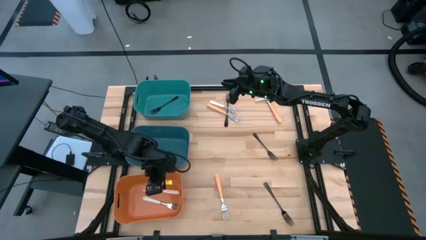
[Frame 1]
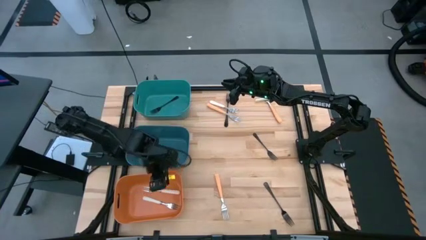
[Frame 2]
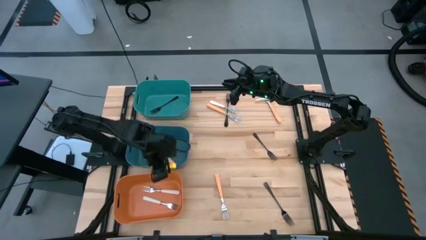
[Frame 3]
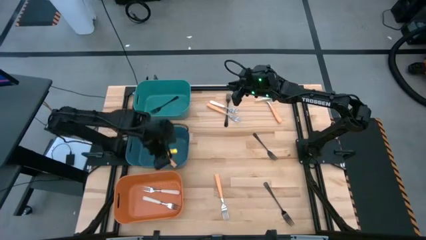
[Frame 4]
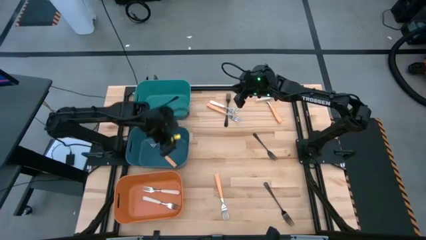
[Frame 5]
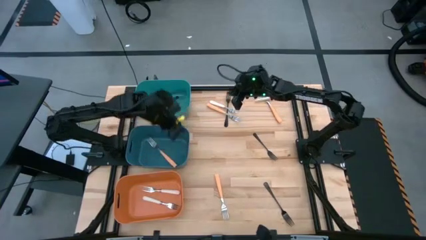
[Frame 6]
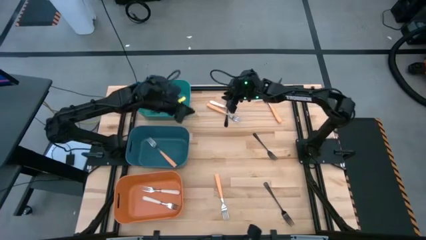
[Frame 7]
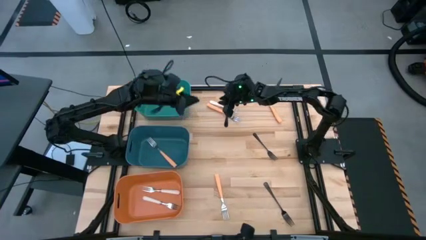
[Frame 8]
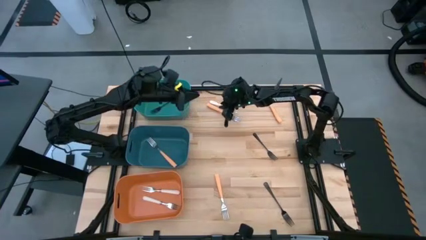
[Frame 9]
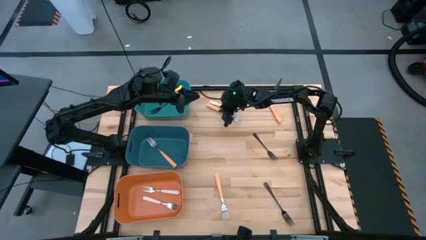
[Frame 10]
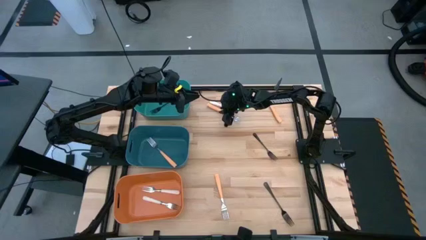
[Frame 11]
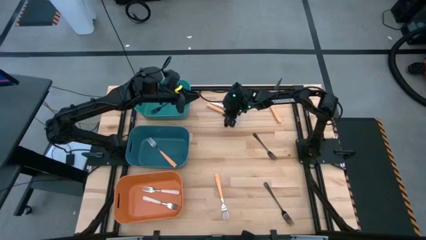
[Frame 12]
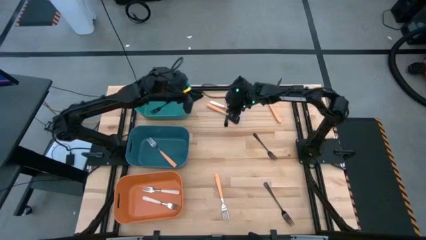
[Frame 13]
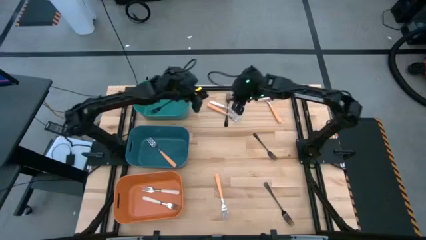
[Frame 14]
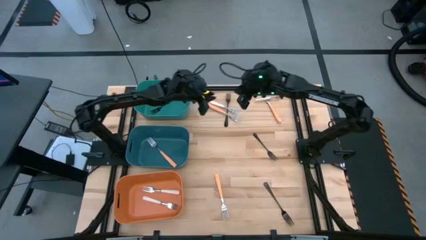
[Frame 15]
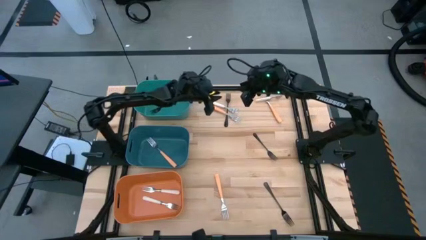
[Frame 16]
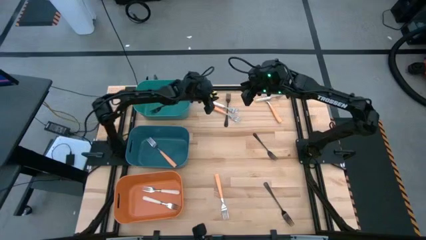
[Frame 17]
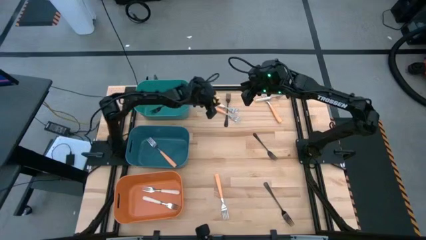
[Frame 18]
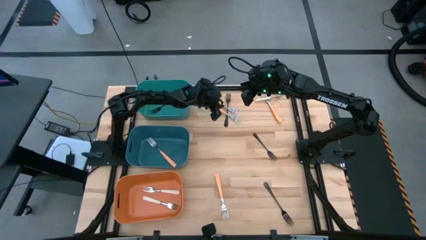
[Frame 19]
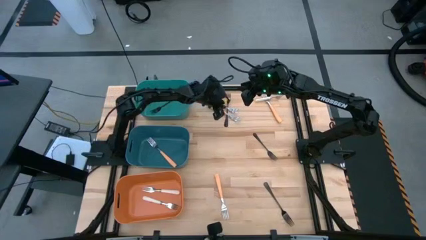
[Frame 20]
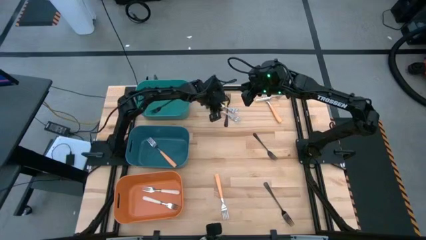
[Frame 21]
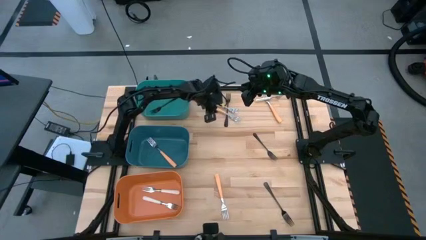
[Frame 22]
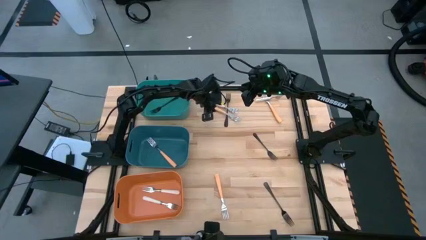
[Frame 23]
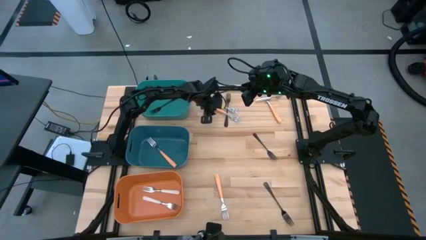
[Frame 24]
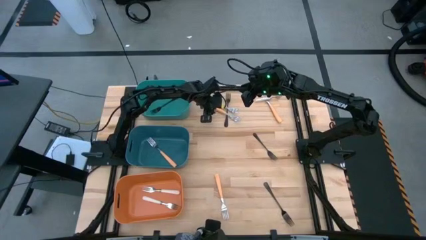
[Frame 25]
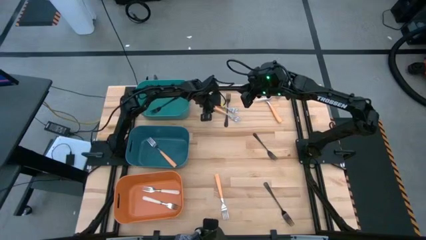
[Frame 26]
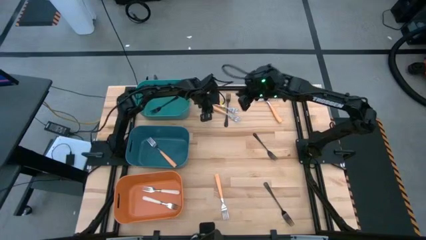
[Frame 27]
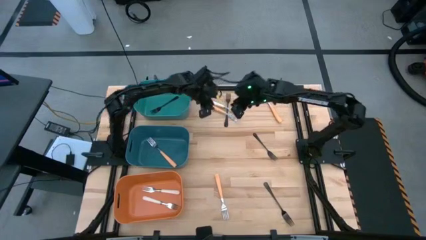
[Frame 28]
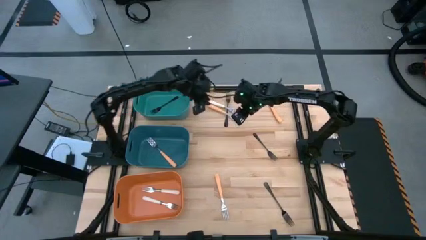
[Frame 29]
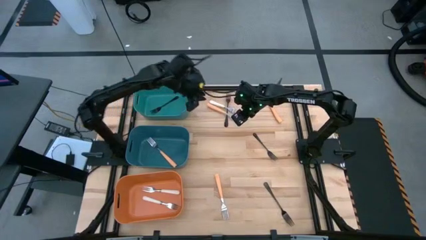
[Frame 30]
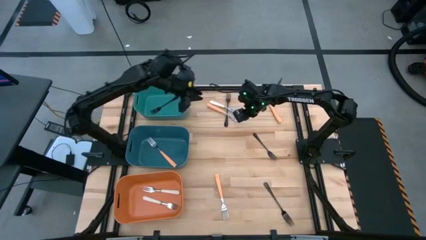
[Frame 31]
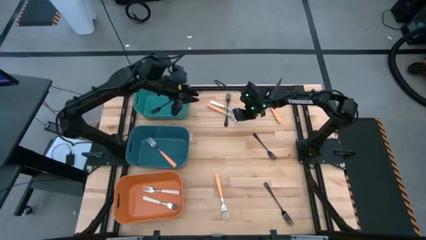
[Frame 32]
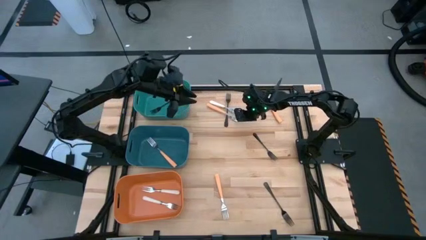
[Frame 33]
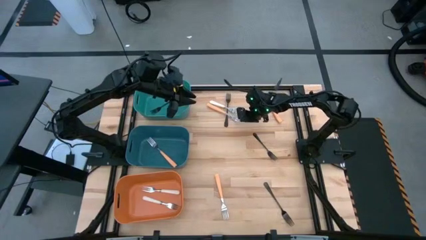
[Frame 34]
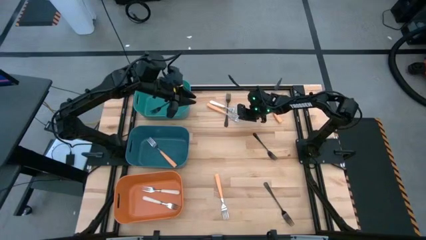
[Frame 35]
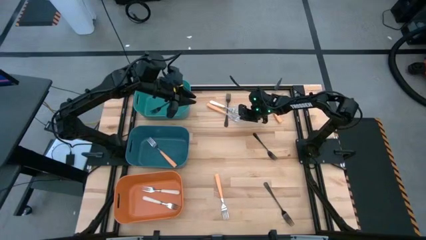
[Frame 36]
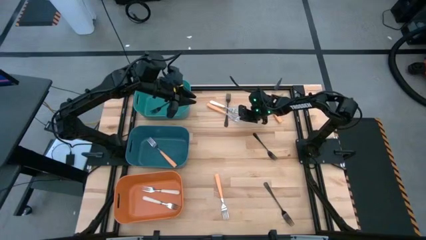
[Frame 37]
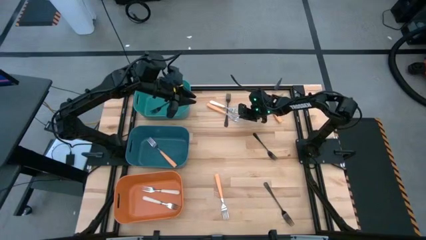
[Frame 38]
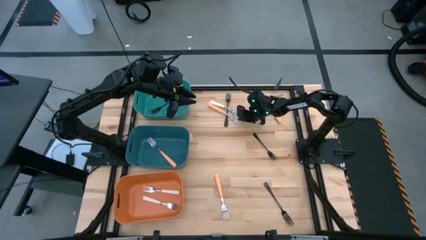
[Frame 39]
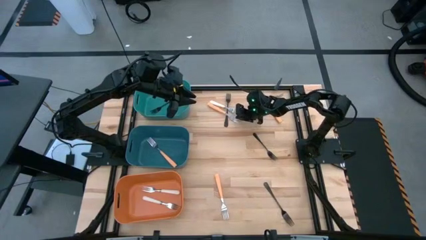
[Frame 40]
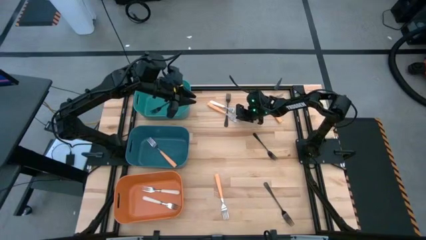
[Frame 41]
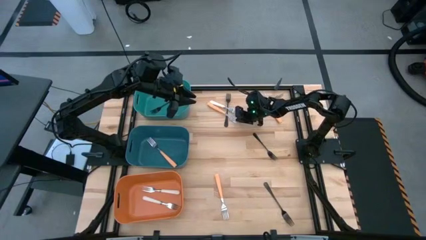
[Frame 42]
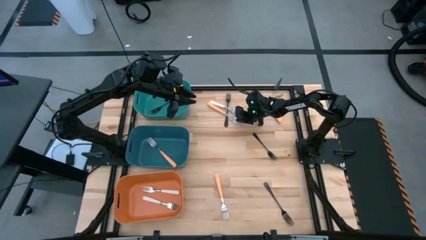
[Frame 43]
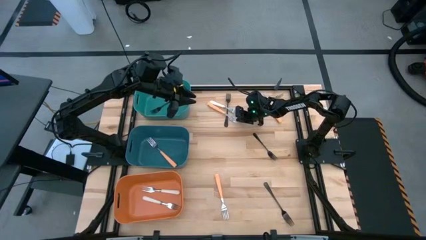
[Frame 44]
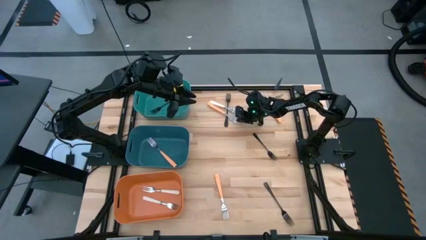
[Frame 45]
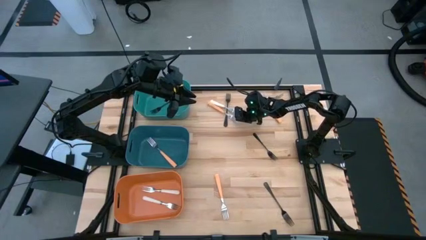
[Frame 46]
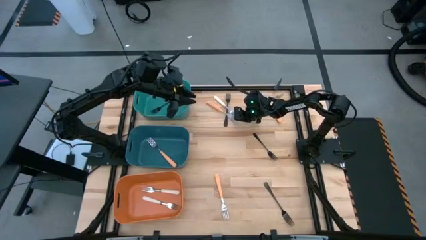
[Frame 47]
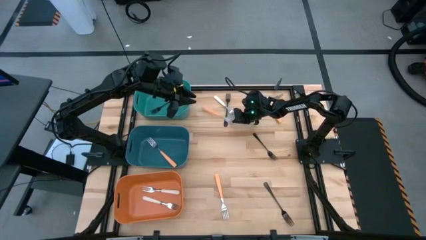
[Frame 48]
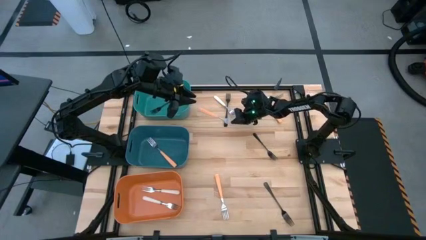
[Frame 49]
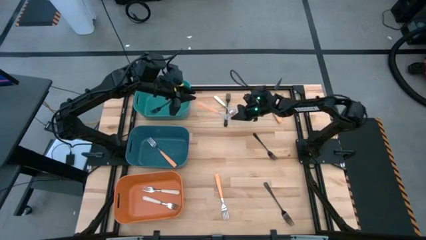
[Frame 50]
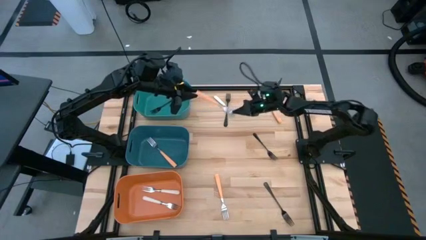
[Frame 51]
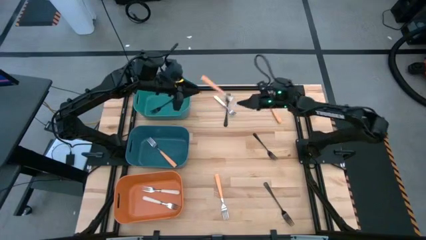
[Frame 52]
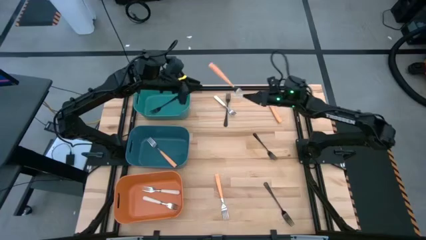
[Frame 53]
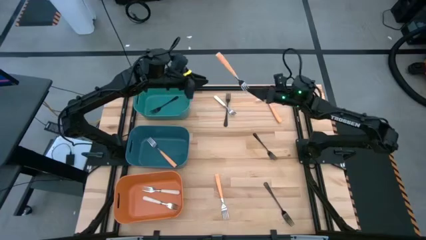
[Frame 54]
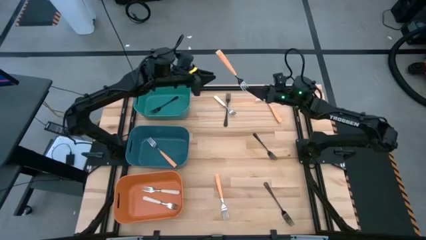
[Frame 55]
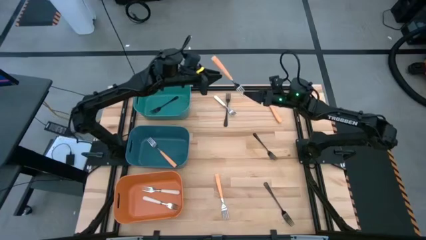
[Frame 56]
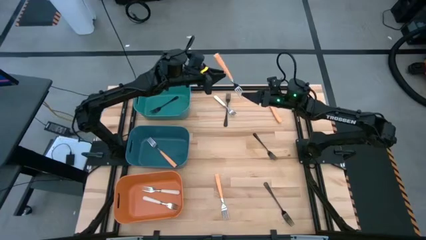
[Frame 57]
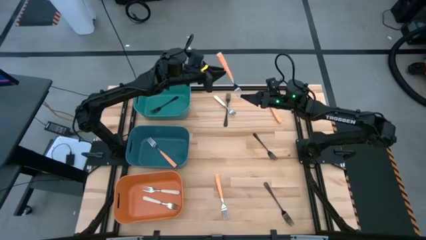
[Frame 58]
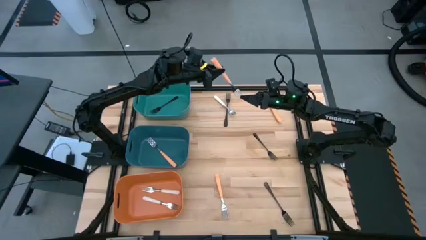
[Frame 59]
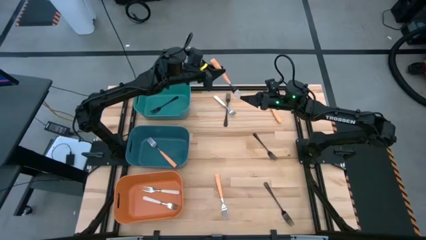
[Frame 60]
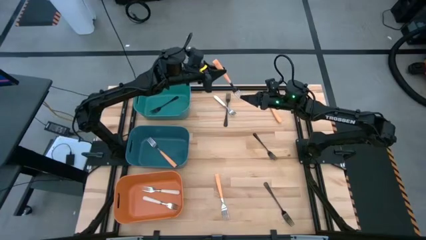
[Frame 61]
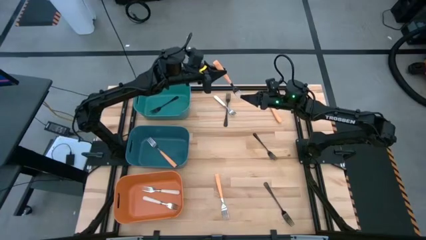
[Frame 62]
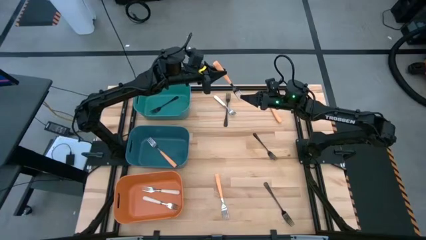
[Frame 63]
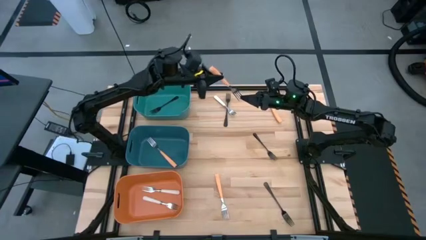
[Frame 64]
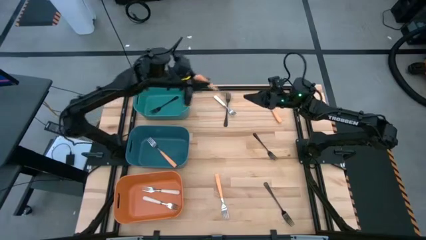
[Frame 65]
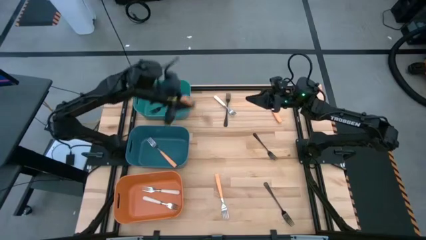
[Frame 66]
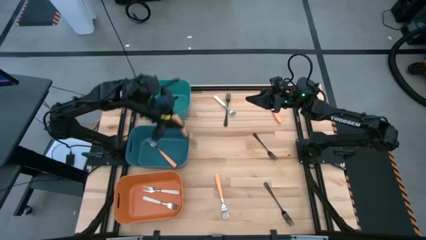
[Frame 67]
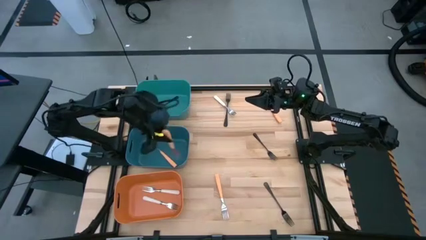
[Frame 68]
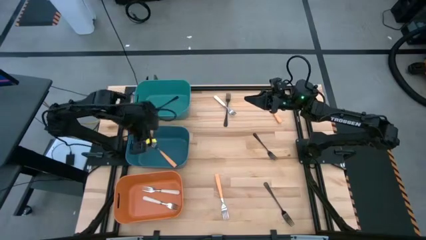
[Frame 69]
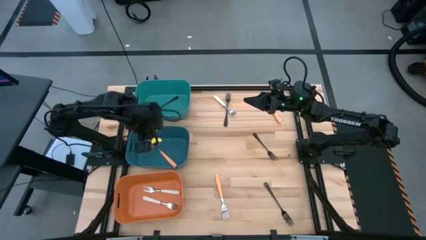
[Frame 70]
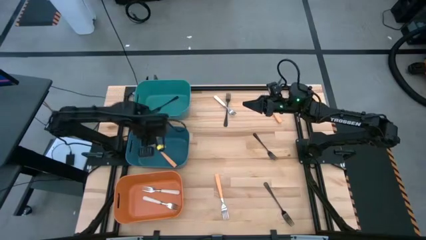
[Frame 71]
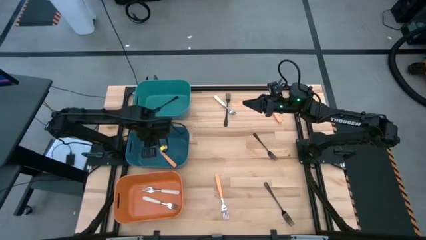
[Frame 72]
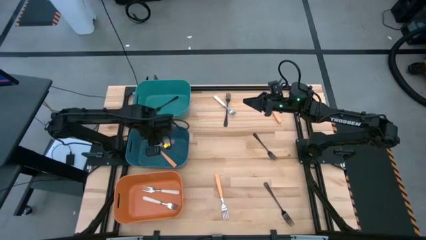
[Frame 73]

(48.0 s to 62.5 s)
Task: Sort silverware by color (type)
Put the light orange fork into the blue bin
